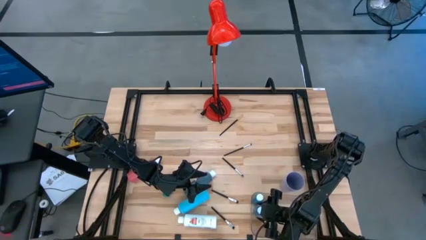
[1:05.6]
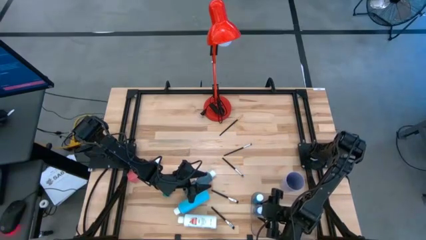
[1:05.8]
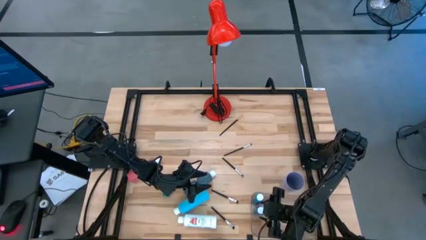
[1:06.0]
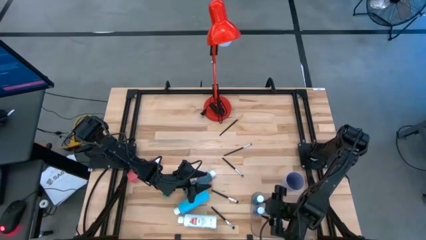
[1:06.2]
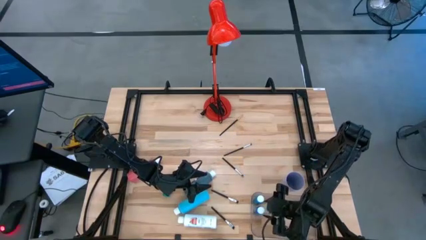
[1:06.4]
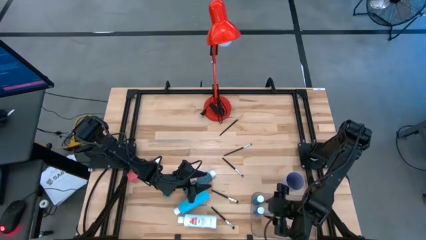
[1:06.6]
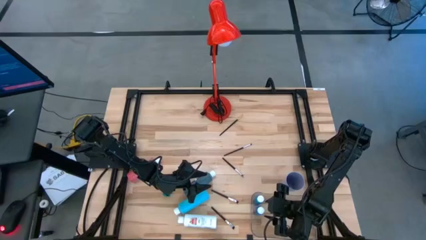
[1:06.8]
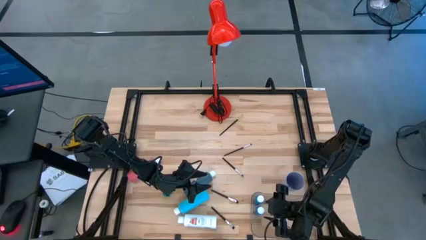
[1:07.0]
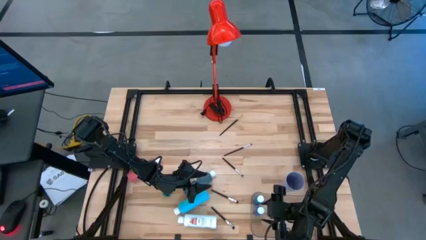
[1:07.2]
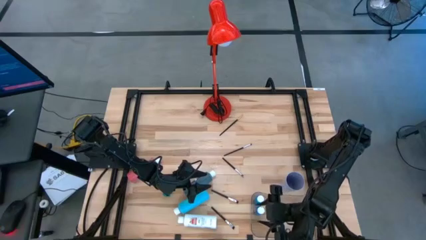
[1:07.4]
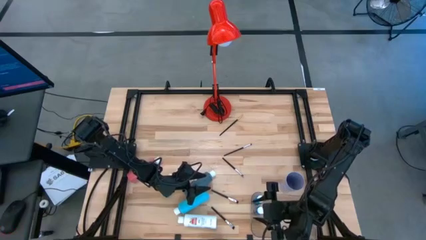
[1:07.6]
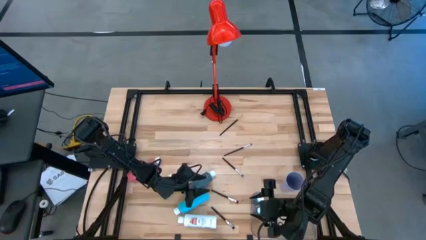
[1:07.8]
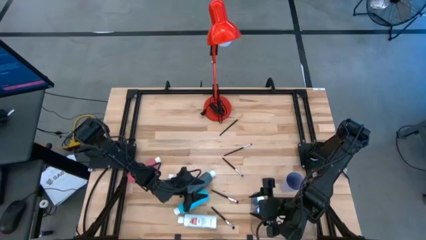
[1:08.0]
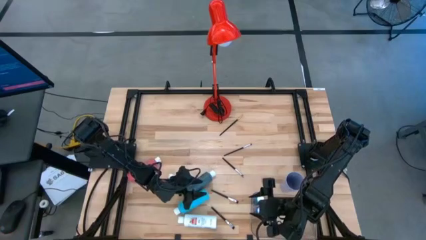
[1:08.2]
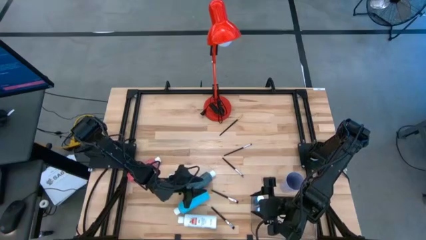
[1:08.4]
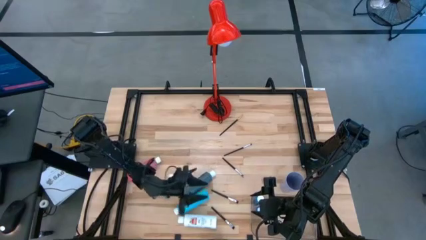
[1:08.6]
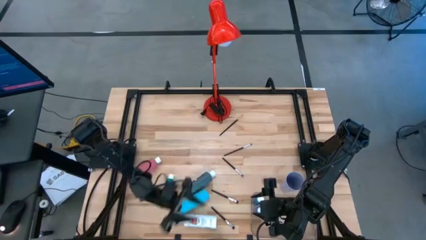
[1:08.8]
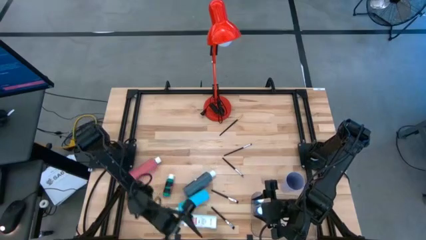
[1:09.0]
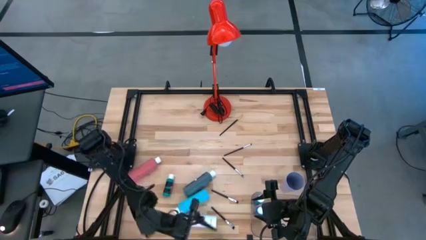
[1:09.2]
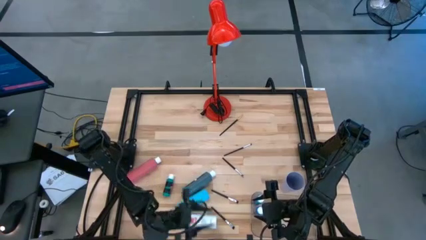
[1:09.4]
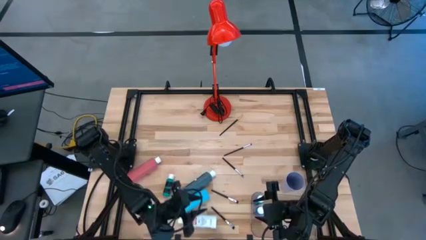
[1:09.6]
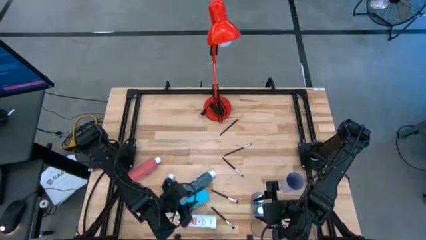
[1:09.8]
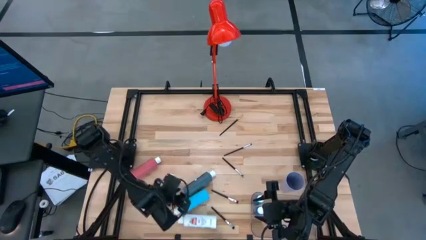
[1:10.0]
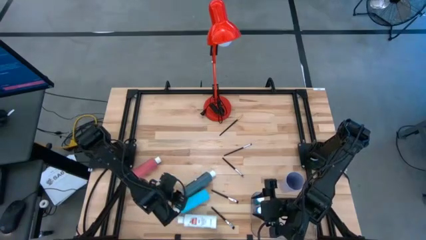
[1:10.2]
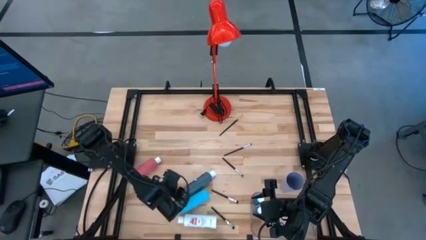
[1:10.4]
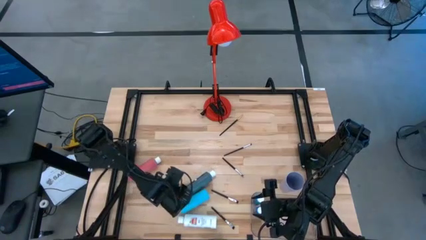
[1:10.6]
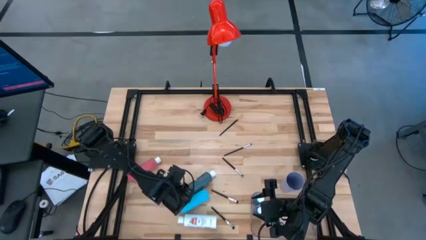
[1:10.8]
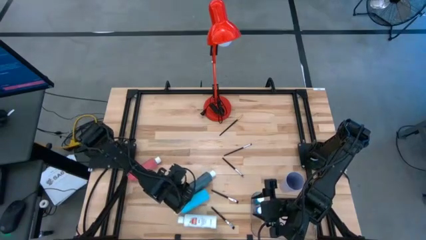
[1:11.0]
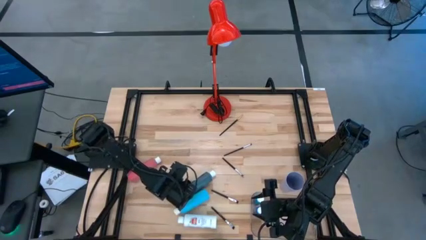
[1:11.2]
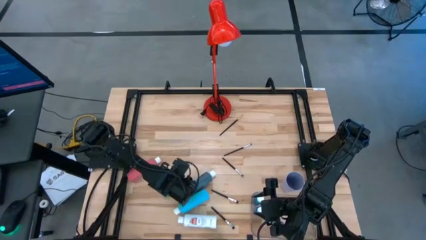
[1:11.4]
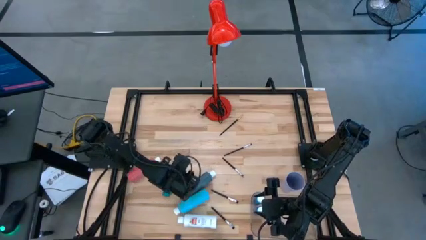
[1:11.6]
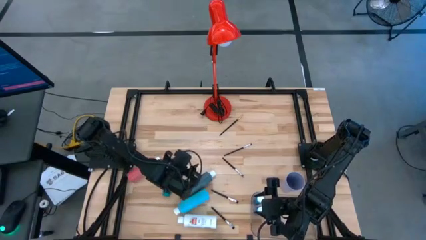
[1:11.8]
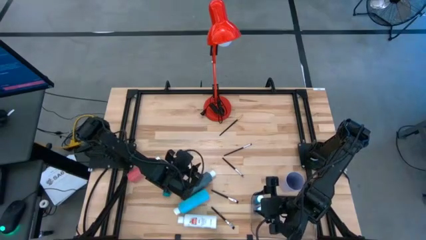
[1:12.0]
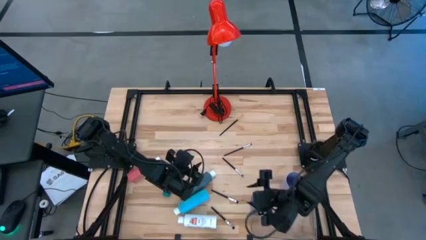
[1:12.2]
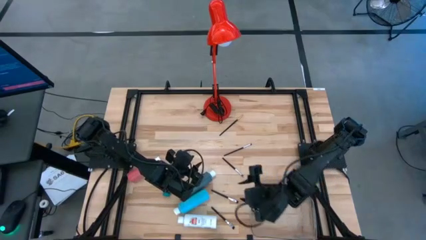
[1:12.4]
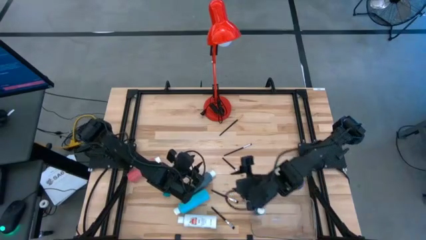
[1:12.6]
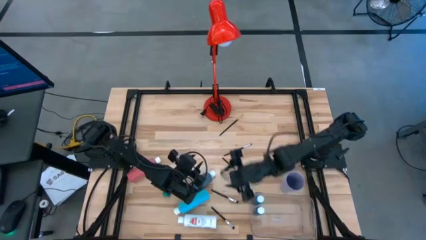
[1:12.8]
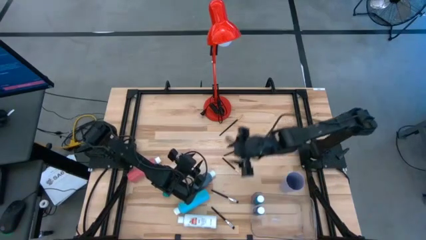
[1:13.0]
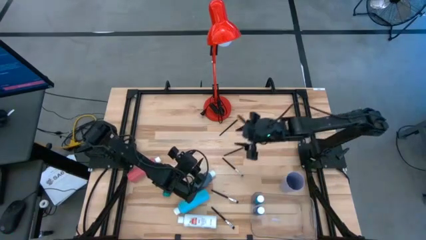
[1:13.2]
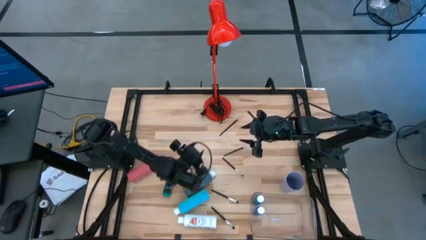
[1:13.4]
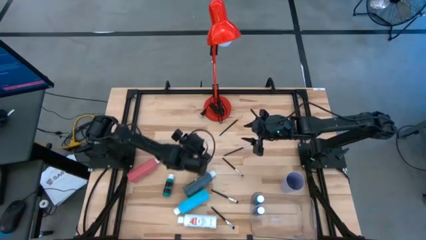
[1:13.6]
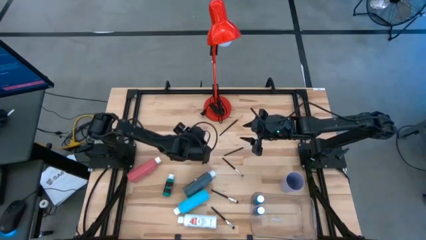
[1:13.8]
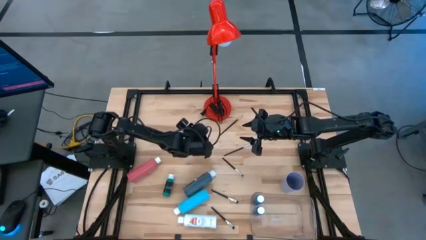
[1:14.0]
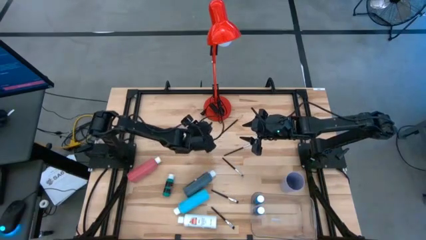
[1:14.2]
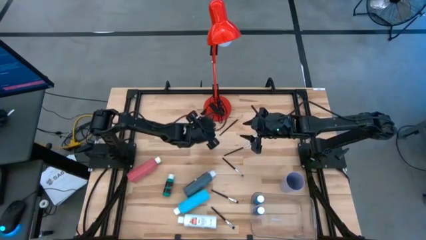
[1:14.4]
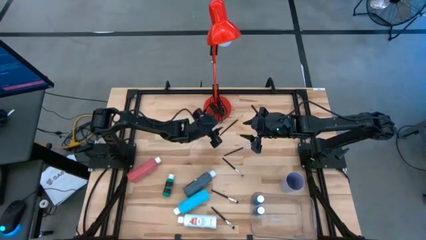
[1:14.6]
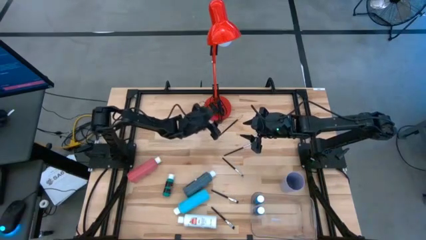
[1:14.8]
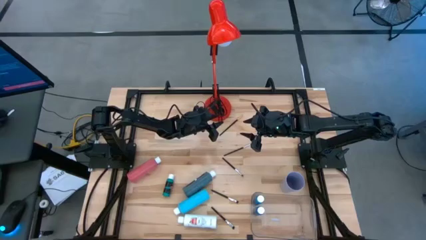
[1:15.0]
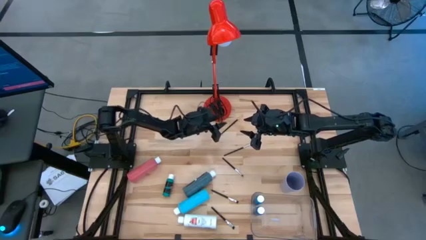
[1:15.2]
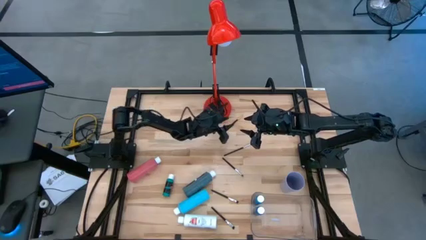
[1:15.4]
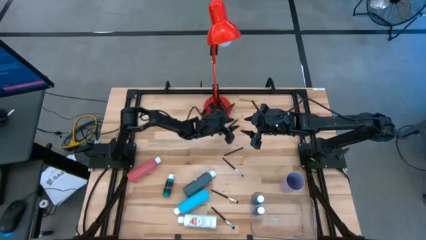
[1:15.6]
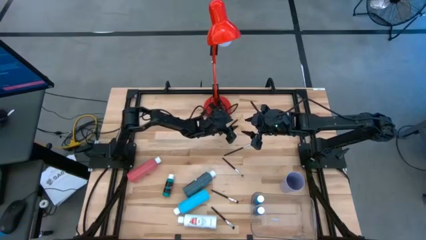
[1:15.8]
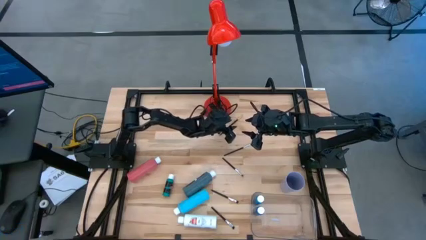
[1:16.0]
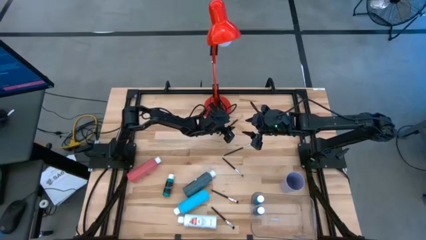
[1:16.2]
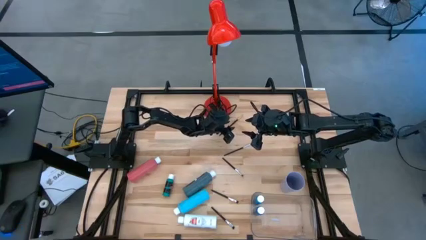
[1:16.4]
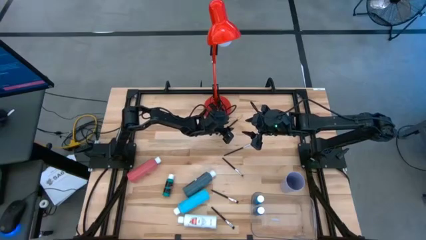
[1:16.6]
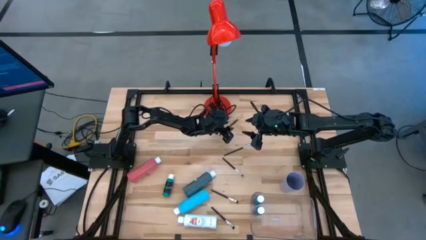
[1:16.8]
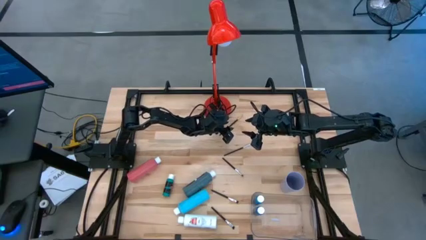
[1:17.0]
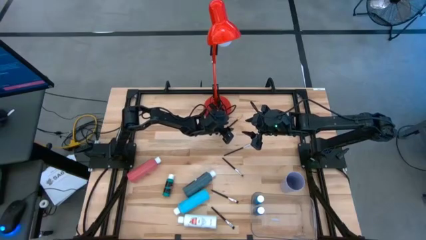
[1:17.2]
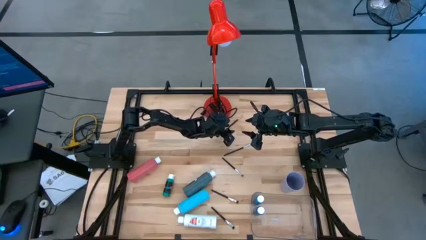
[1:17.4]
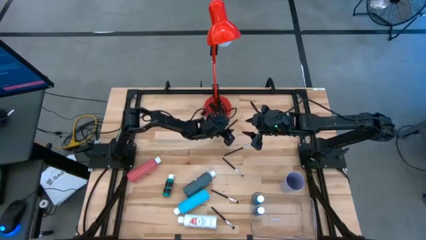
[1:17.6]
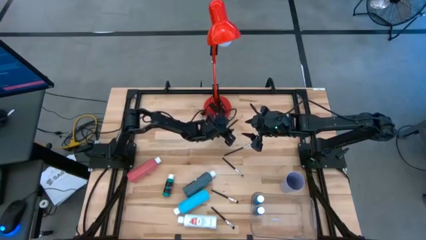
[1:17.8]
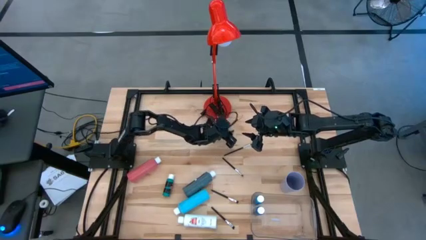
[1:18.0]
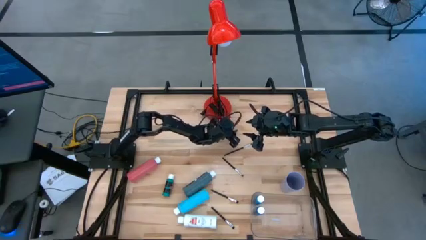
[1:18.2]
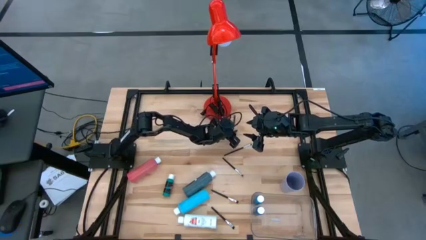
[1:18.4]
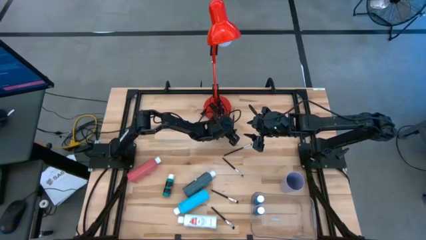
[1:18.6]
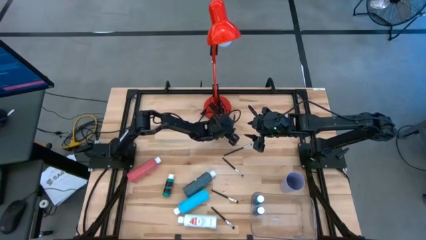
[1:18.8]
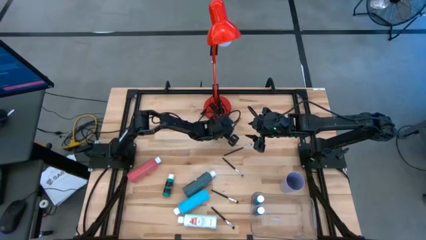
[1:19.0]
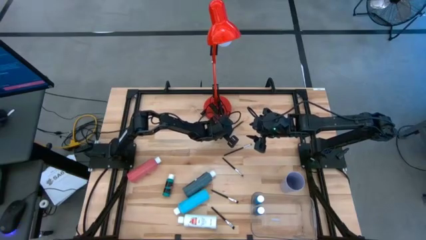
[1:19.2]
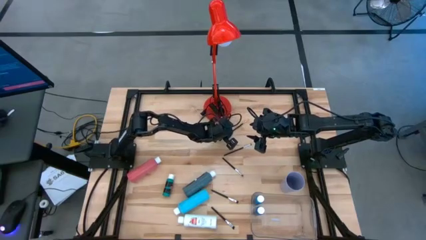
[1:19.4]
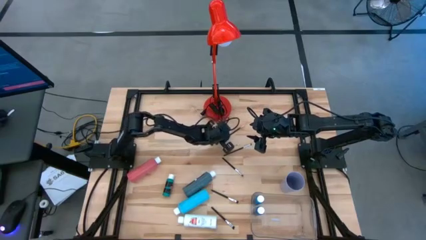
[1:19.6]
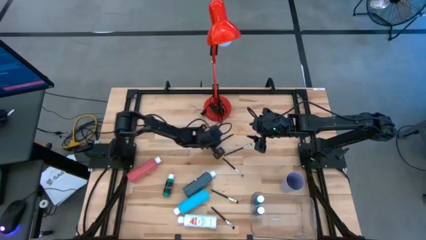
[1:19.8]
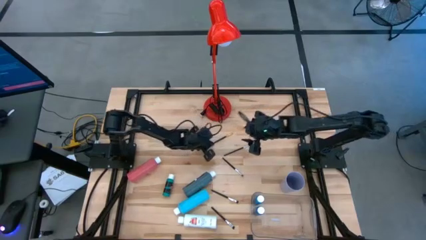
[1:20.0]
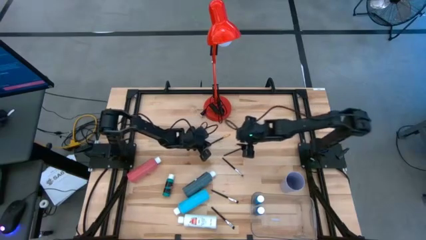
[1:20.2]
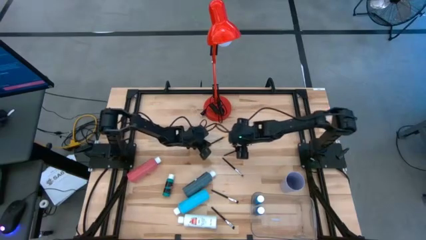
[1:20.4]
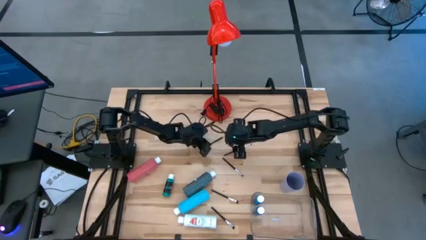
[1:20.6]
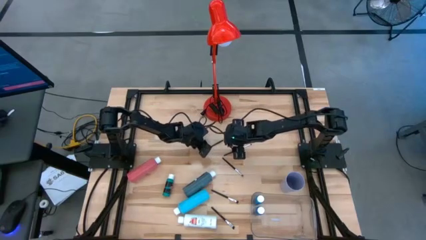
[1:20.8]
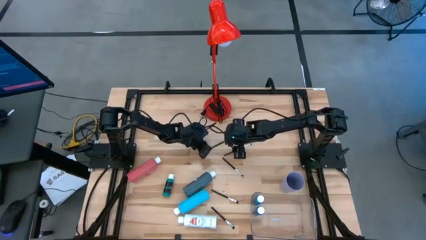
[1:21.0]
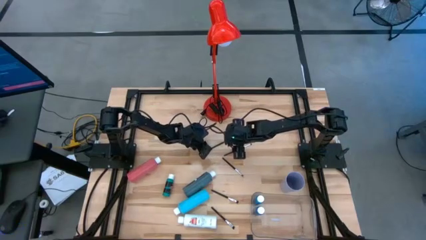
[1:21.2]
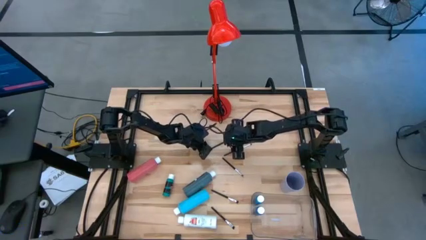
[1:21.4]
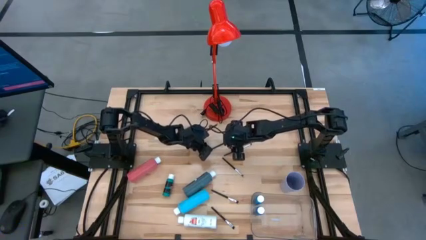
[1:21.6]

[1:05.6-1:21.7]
Task: Pick & Place Paint Supplies
Put the black gold paint brush into the purple cup
